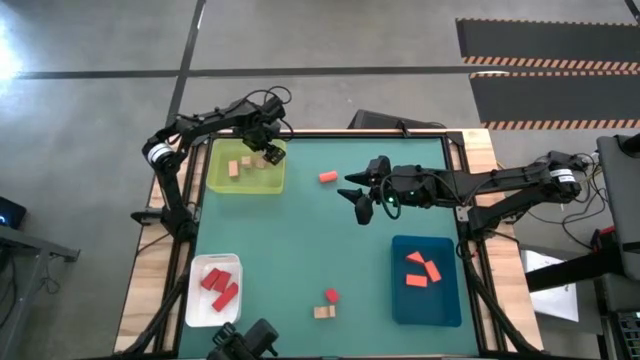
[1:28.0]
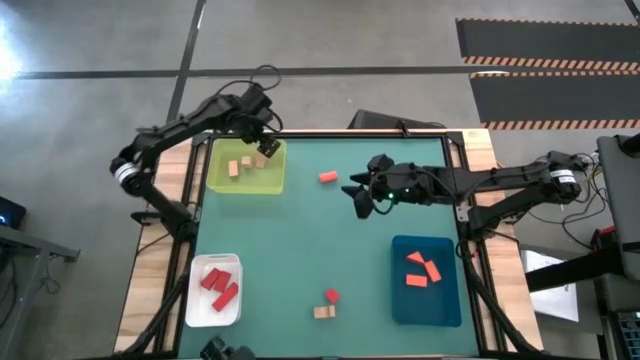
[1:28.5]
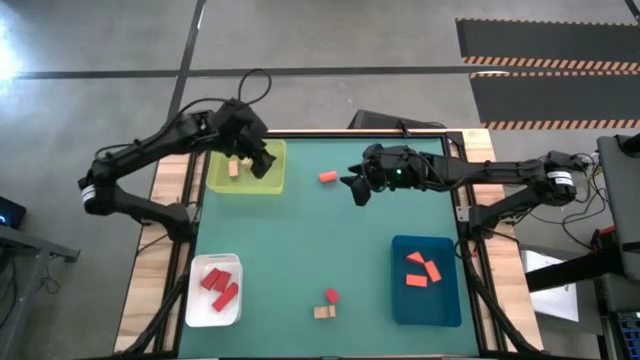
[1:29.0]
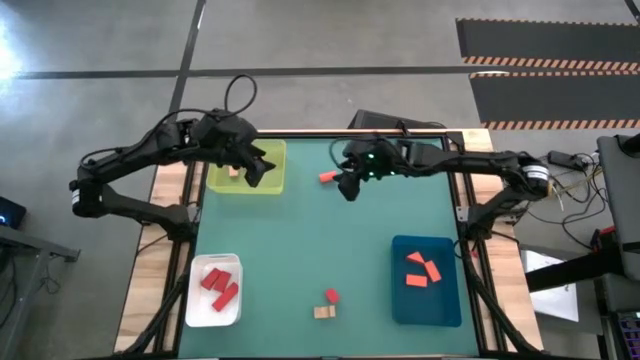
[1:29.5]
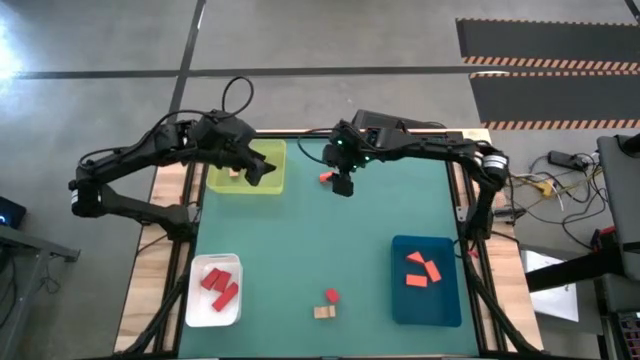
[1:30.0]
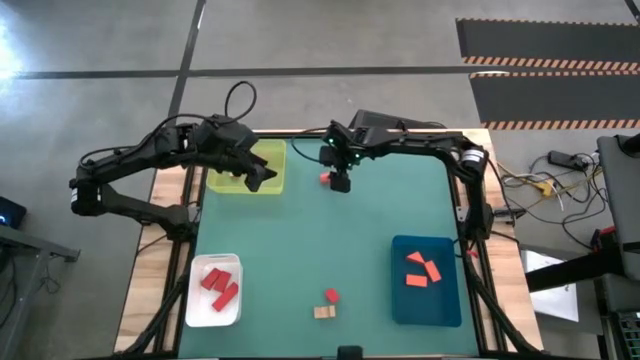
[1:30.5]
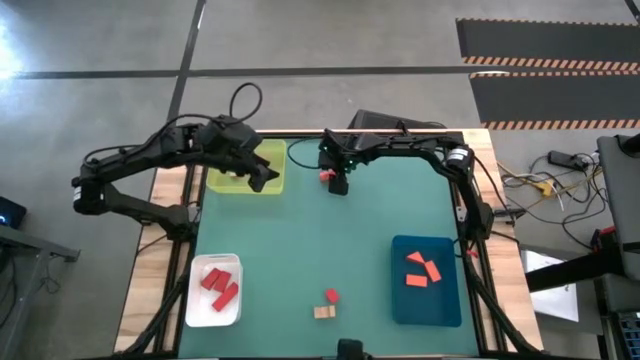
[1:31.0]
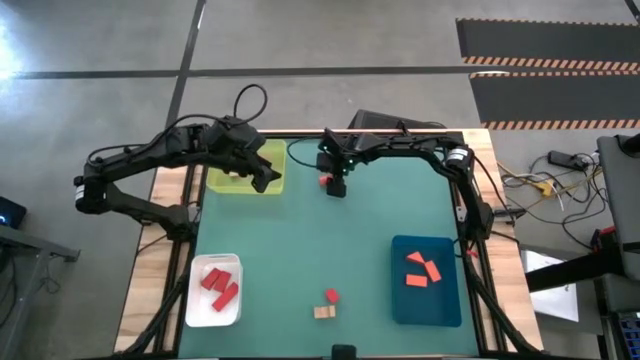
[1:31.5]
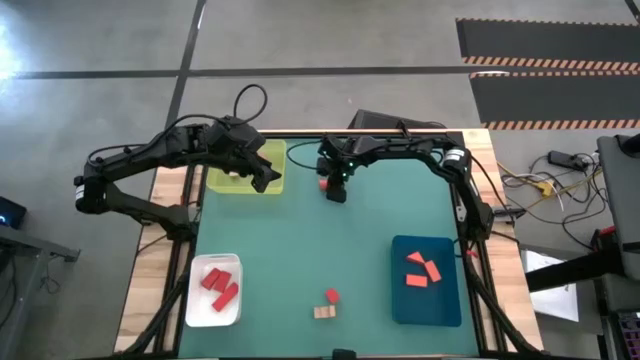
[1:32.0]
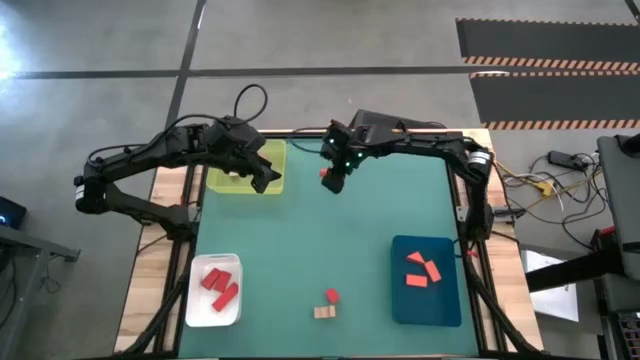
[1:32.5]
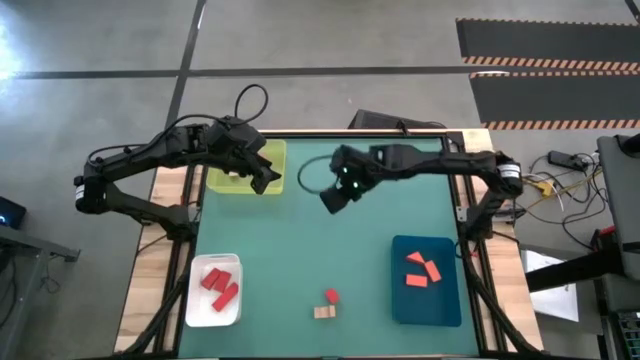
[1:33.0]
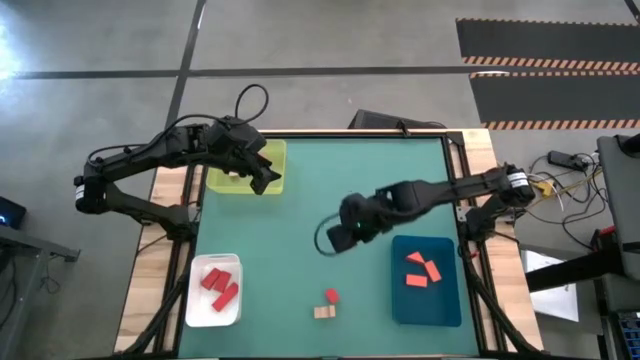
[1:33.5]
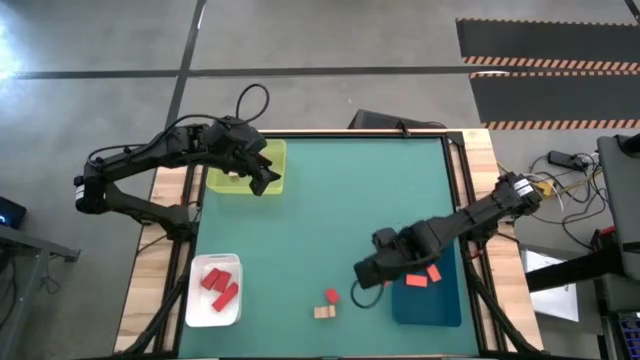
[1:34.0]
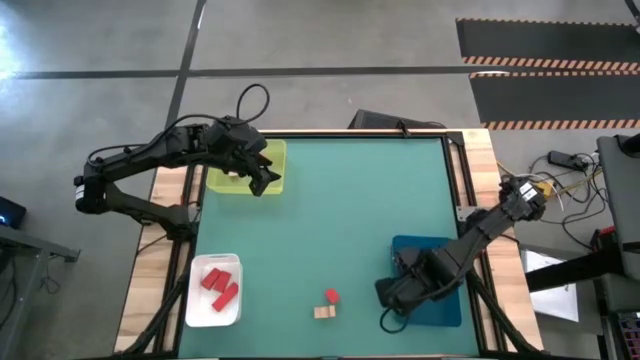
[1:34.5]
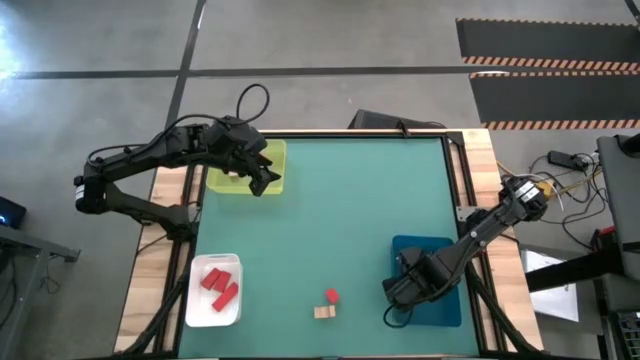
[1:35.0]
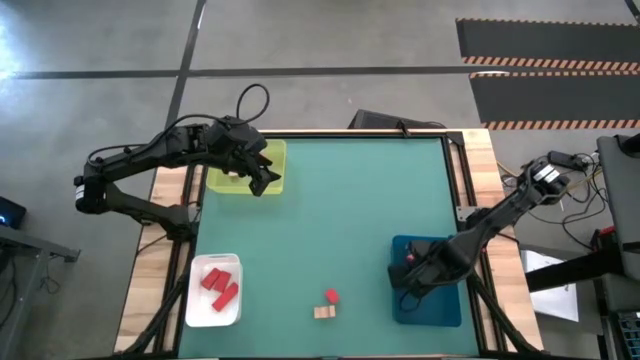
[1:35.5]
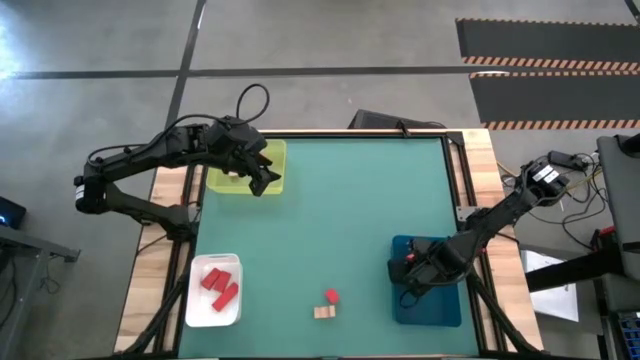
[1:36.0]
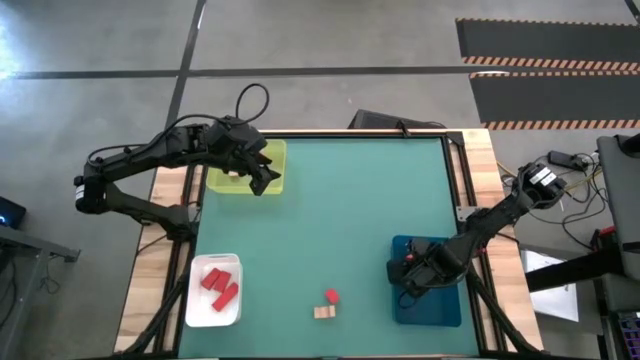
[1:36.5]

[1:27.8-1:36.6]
Task: Sort & place blocks by color
Put the orange block into the blue bin

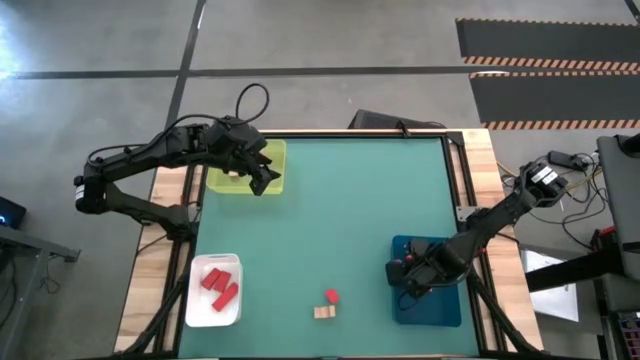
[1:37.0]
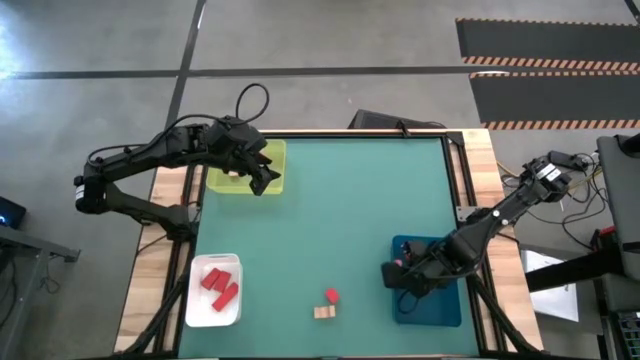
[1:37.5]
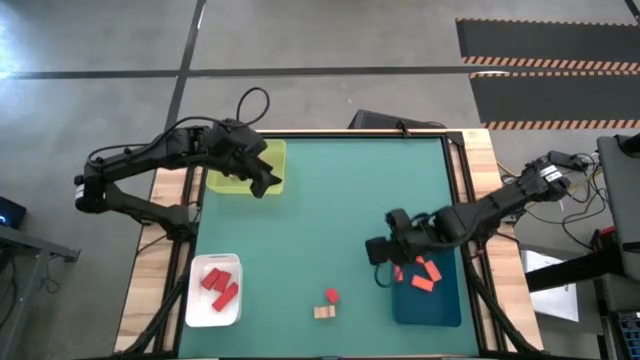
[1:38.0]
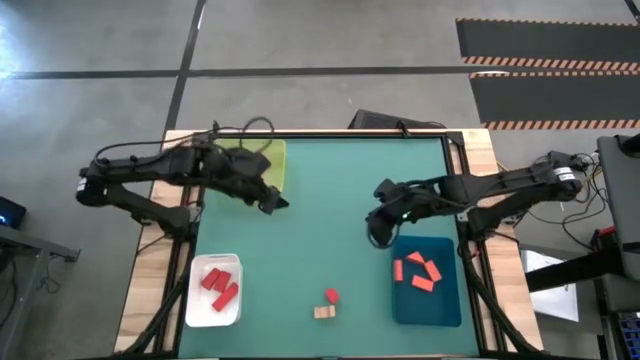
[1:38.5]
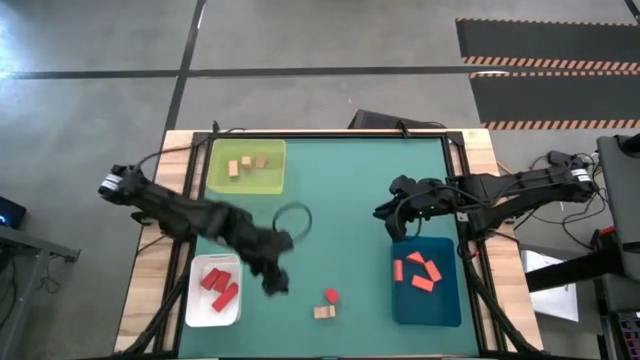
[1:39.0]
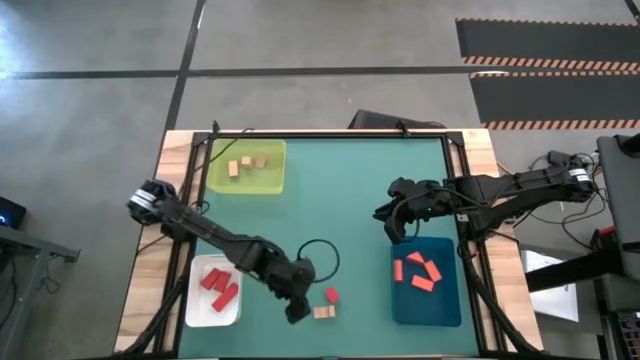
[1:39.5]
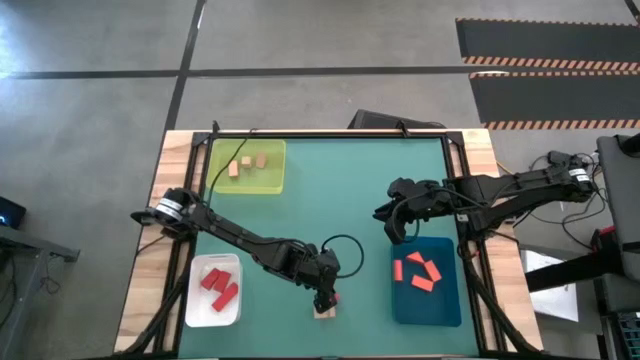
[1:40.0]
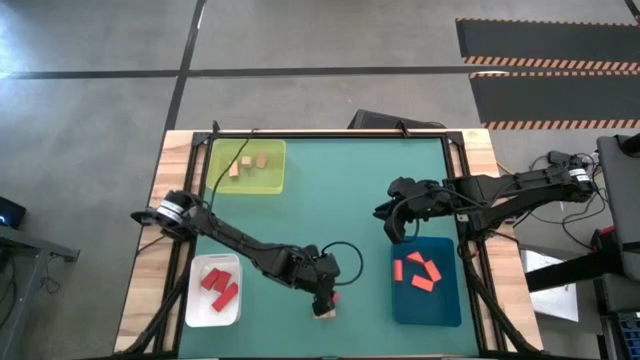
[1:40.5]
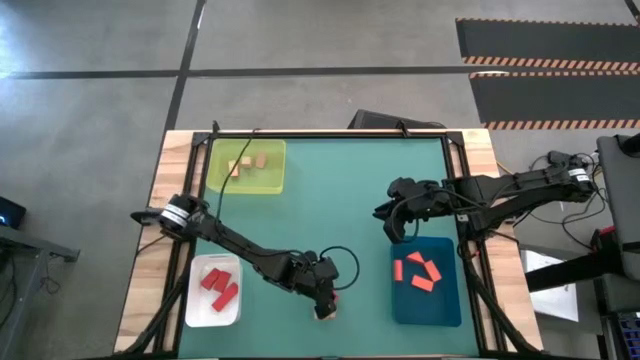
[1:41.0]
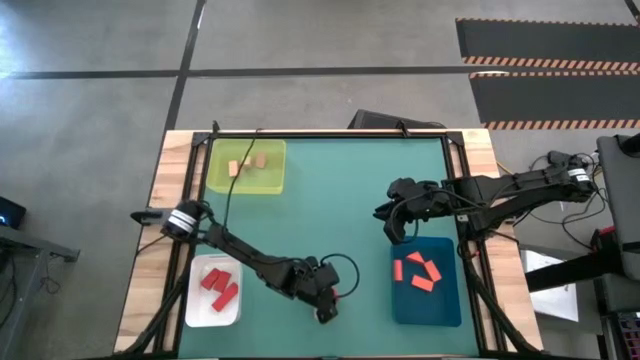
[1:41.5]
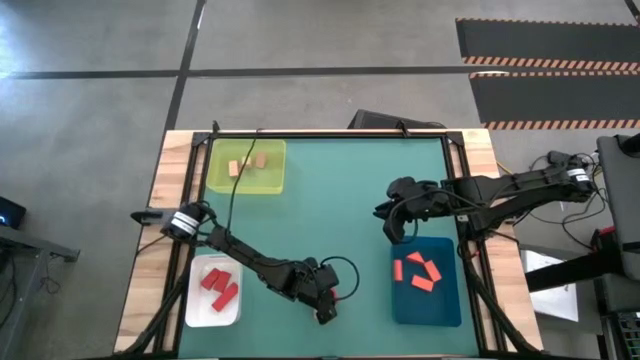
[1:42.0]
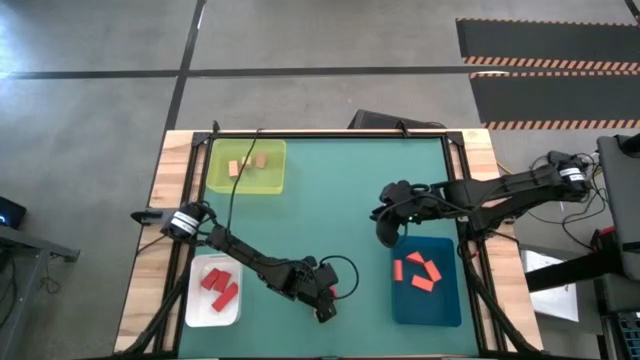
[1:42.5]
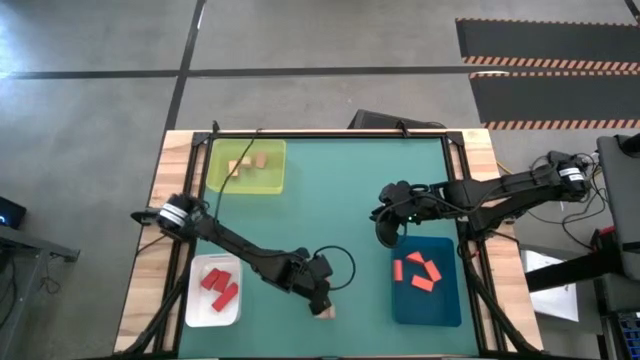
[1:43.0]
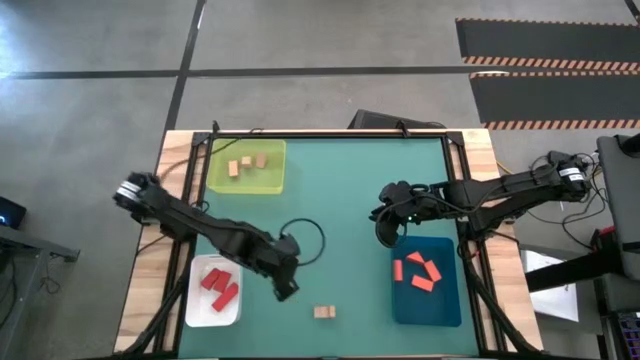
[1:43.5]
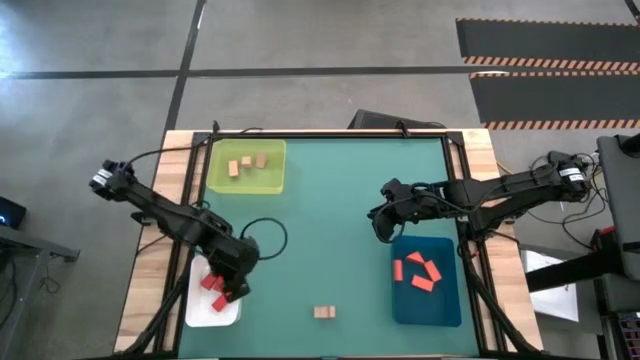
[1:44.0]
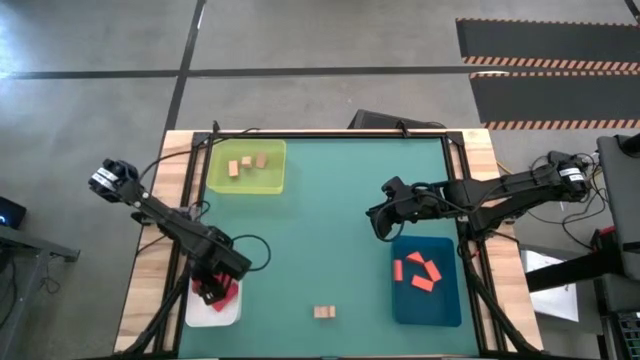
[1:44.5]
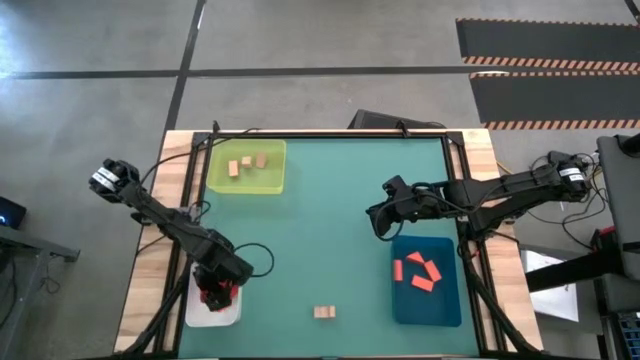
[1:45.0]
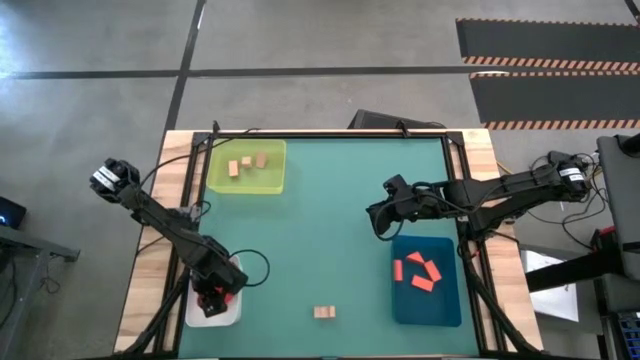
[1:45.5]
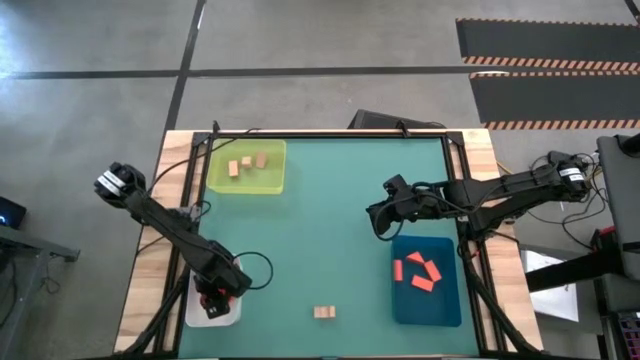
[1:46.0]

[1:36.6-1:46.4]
Put the red block into the white bin

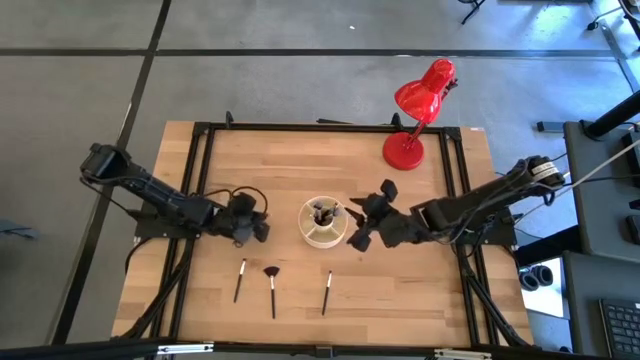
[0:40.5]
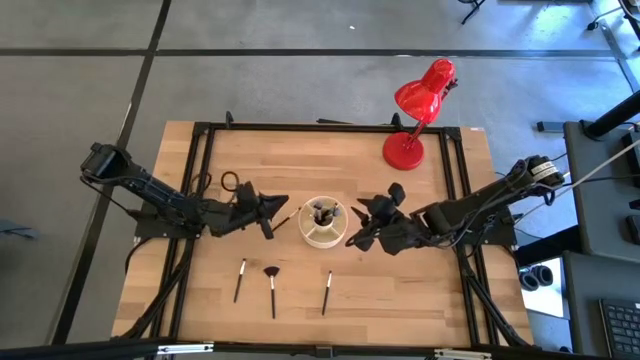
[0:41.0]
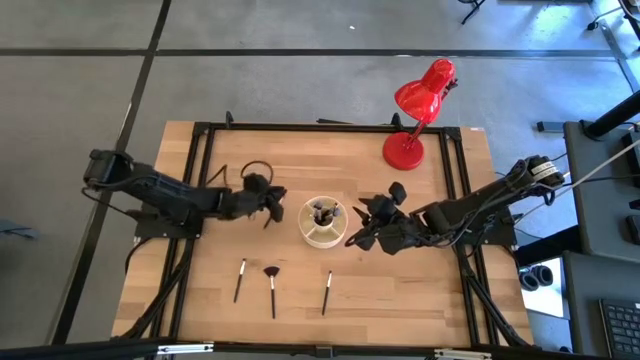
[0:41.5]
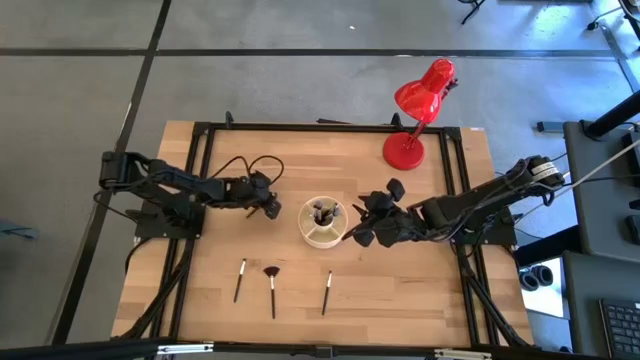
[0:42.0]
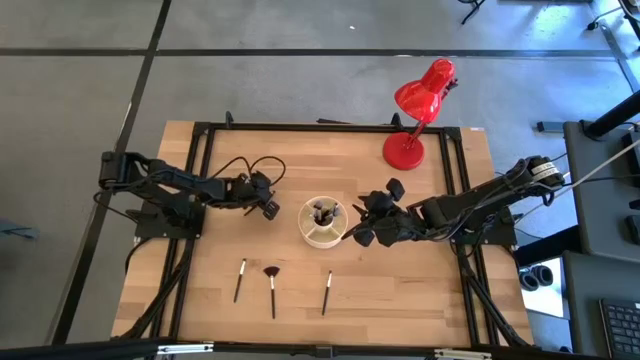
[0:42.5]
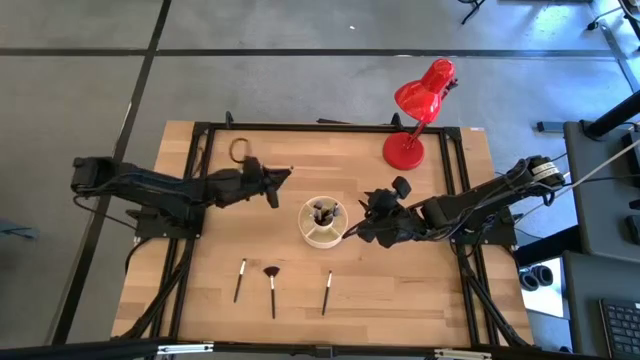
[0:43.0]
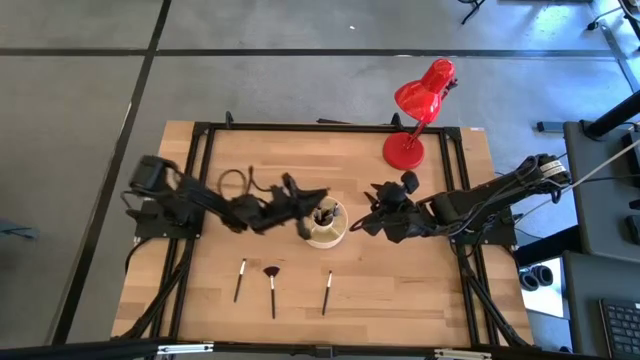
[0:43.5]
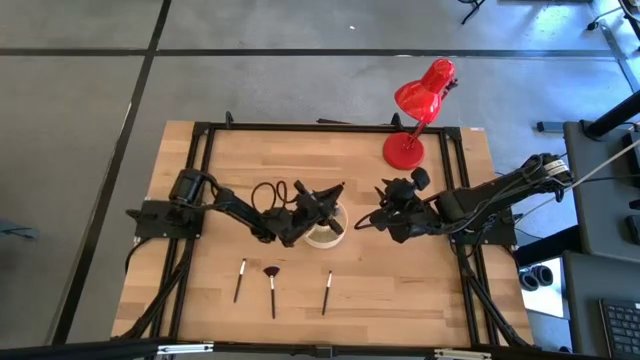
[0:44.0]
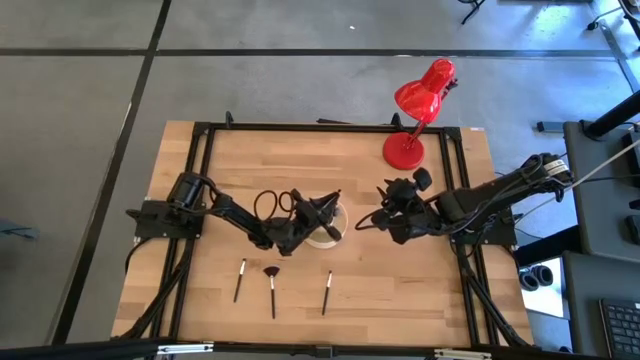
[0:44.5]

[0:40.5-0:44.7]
Task: Put items in baskets/containers
Put the black eyeshadow brush into the white brush holder
